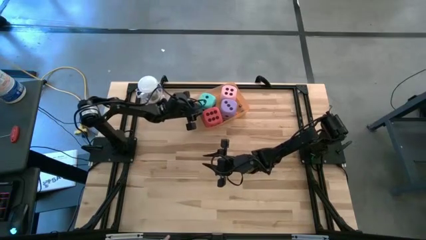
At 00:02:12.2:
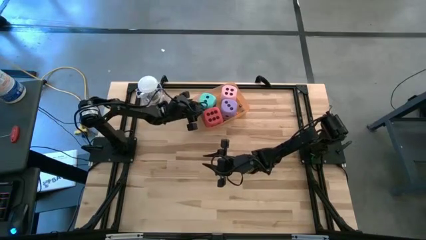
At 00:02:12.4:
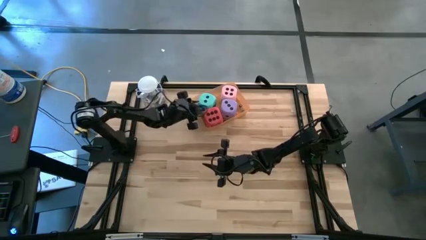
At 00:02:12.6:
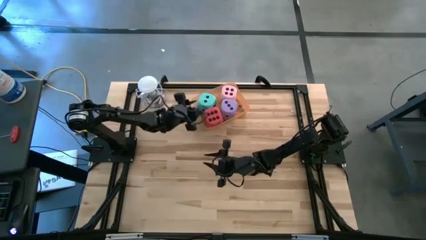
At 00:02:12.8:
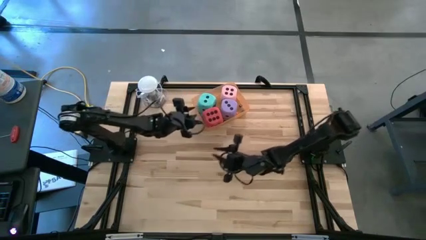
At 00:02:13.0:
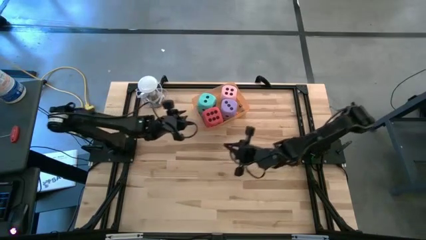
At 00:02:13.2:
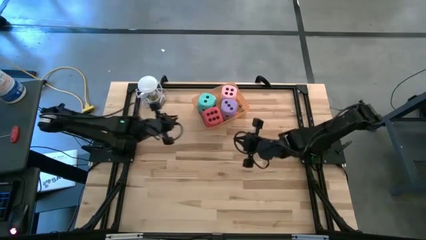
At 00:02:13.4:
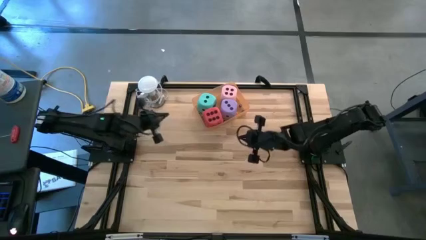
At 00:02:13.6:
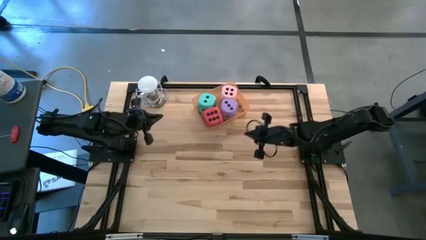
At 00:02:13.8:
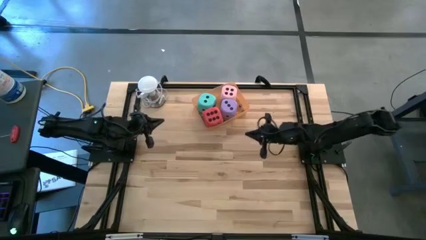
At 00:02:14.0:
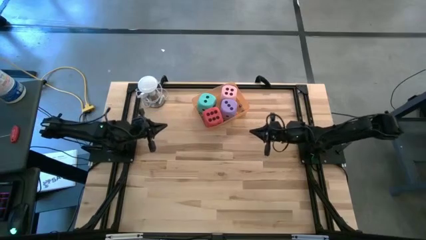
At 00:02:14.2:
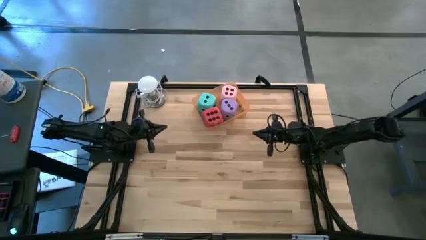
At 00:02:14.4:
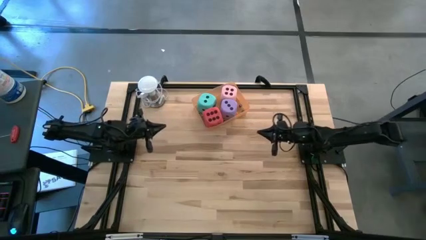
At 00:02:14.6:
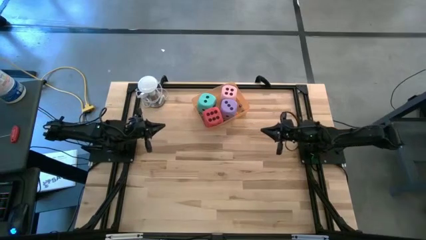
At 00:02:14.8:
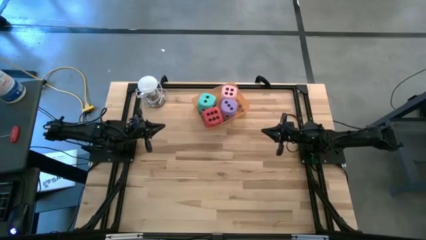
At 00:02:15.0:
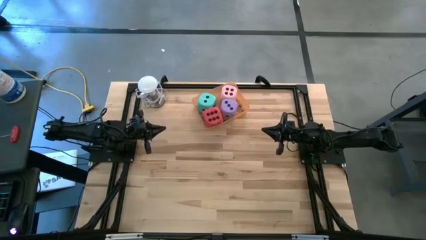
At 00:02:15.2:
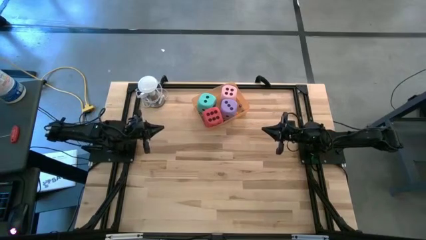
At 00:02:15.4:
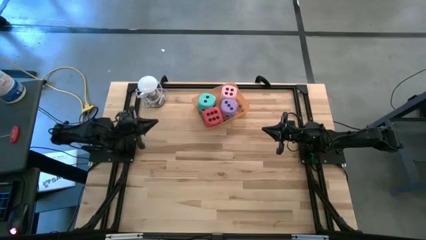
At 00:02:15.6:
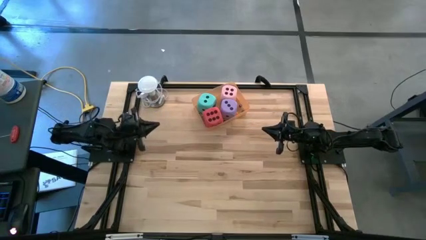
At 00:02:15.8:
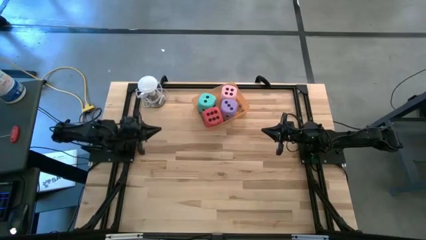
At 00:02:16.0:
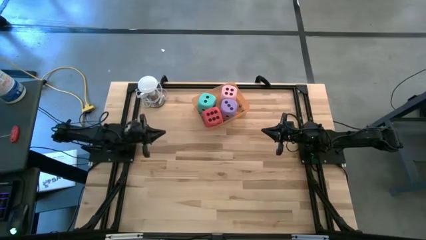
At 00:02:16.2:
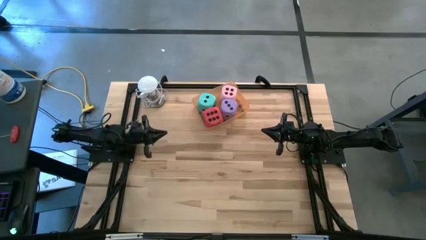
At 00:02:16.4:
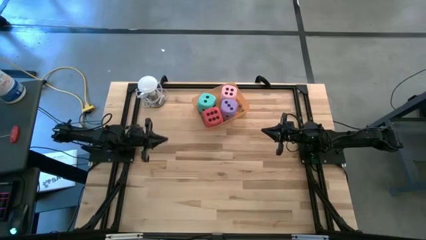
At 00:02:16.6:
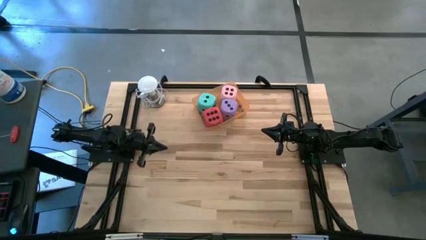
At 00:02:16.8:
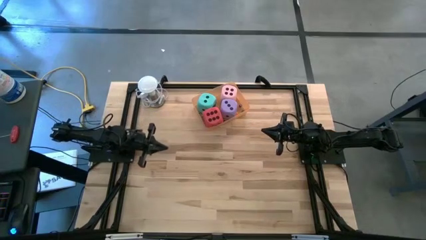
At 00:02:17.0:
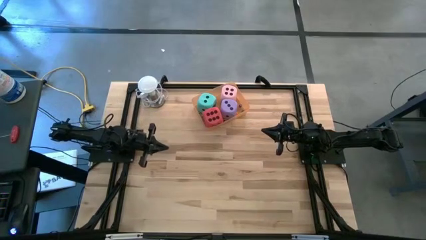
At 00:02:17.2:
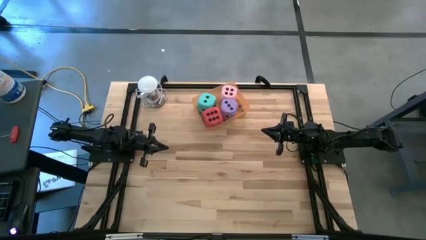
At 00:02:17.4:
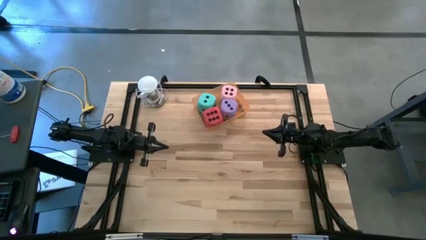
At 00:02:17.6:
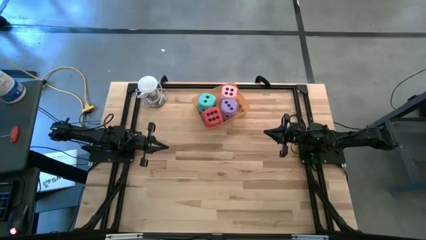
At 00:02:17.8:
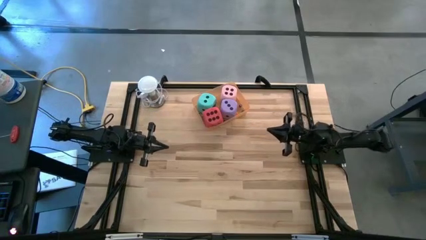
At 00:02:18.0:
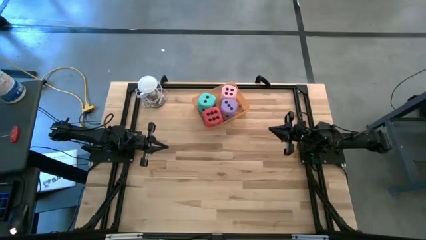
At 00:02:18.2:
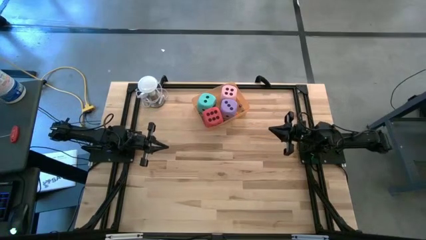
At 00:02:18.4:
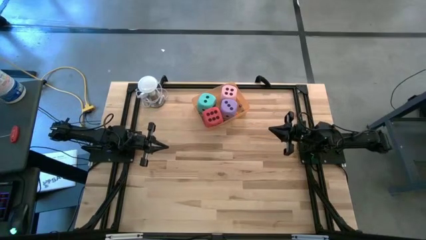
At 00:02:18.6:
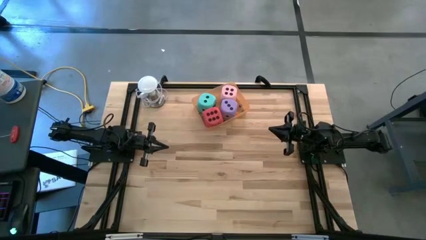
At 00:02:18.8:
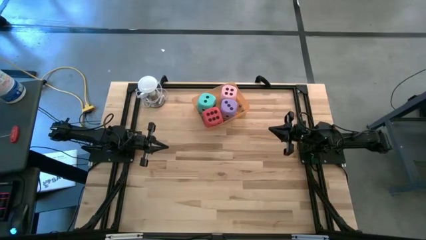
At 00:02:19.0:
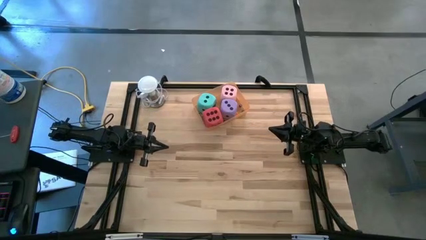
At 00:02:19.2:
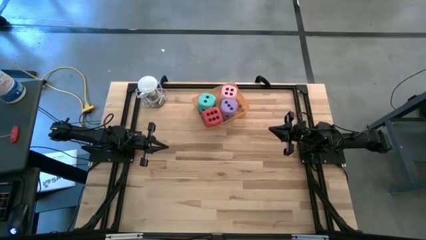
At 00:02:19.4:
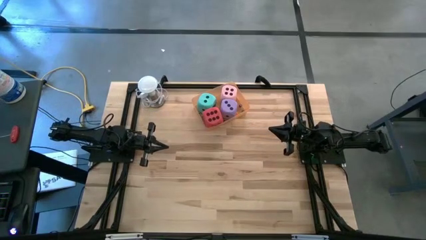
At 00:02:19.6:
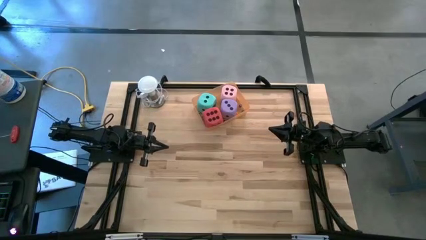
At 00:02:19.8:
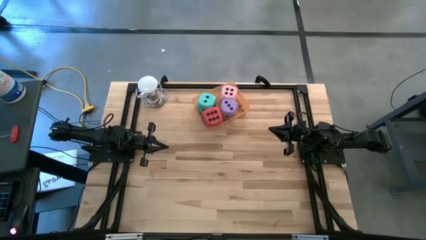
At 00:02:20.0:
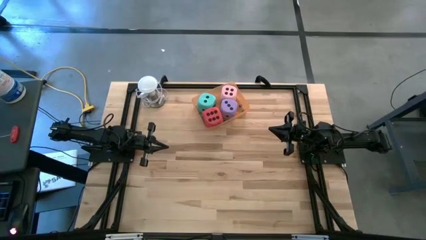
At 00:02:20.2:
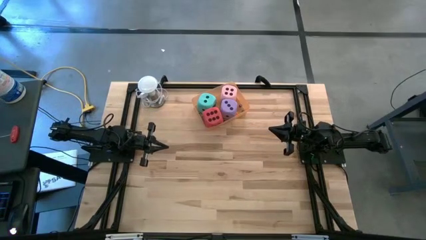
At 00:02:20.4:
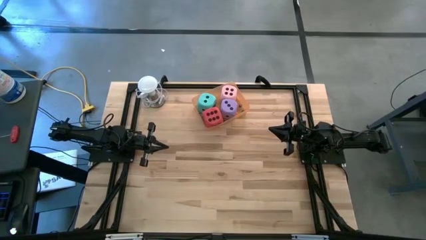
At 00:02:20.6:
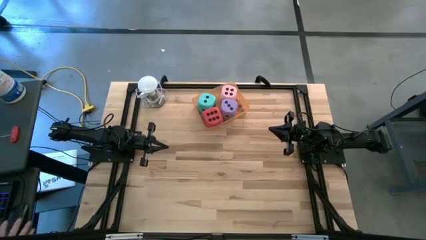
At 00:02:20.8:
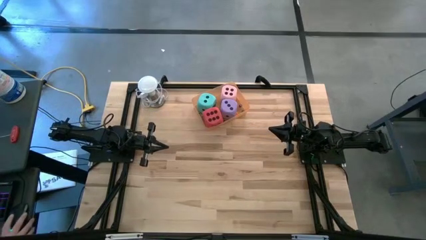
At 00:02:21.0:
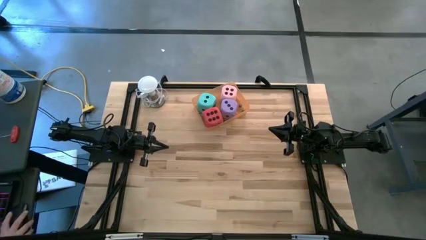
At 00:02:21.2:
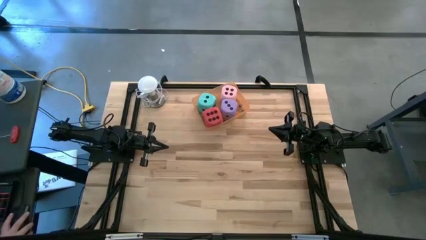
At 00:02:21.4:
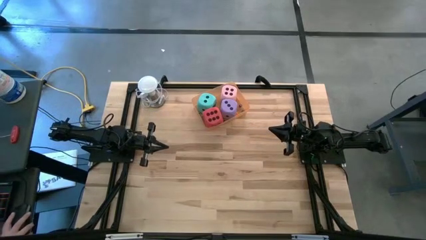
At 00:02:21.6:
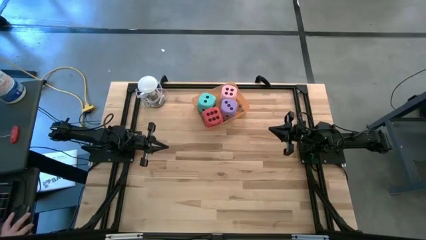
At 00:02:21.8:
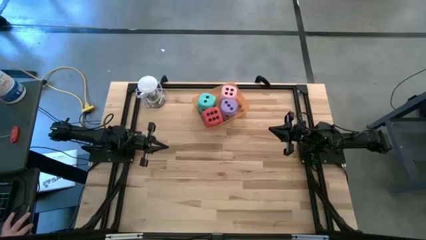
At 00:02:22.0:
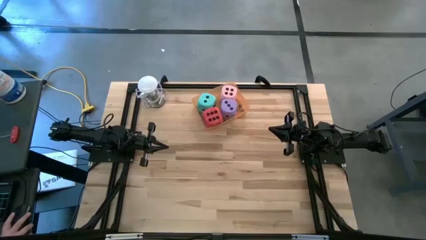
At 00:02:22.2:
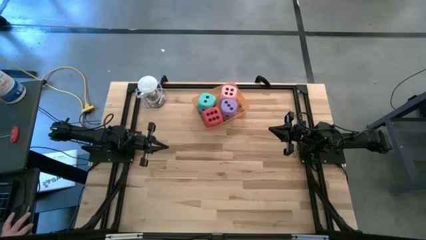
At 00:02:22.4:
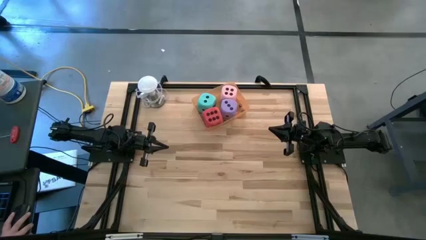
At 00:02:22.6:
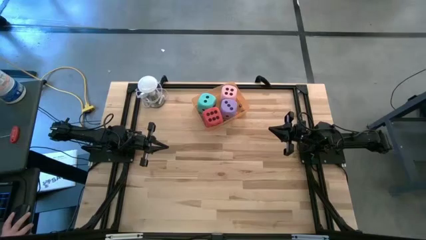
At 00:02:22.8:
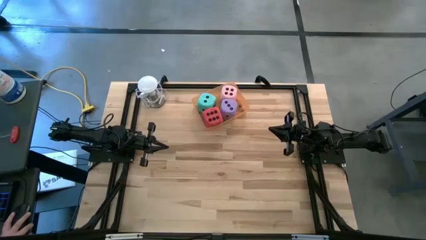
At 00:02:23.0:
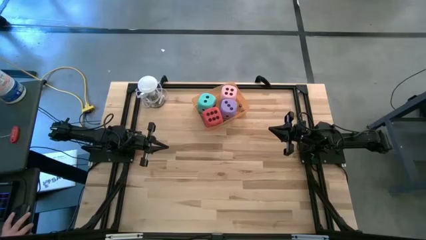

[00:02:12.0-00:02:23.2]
Task: Pick & Place Dice
Return to Home Position
